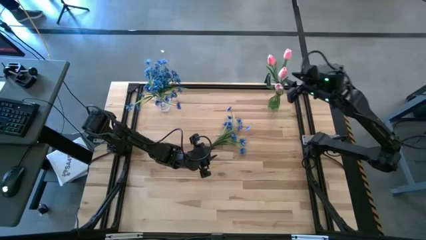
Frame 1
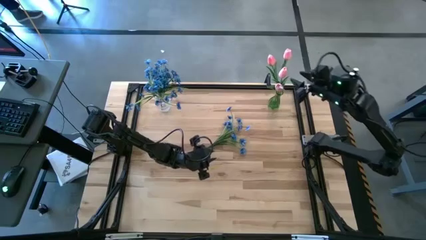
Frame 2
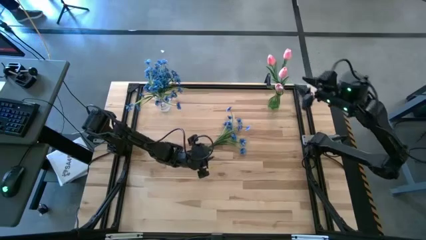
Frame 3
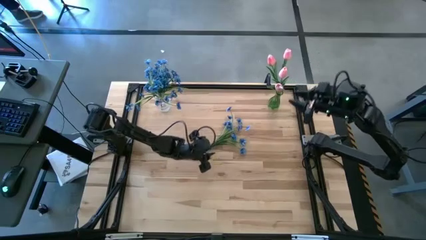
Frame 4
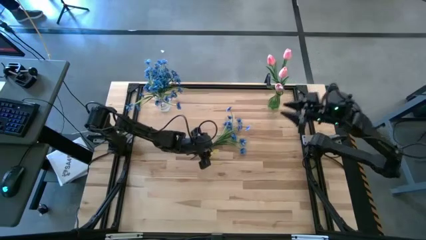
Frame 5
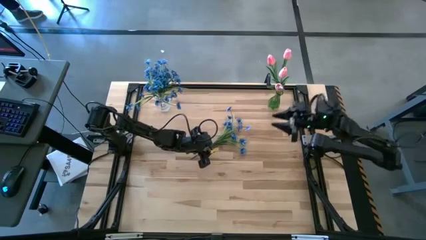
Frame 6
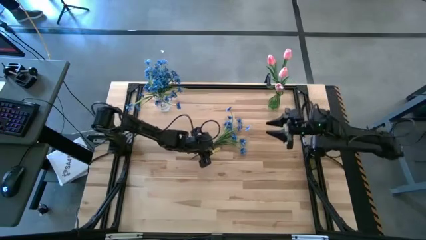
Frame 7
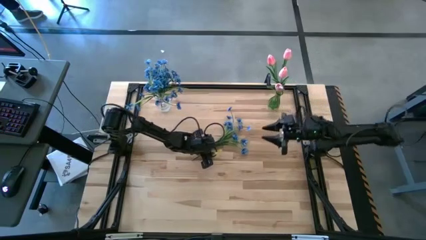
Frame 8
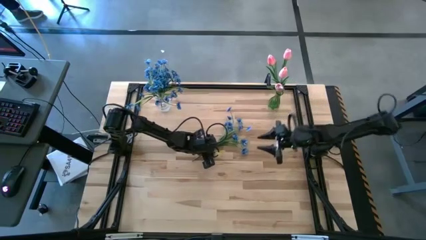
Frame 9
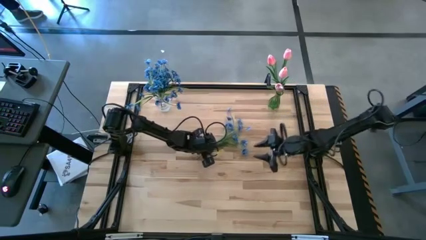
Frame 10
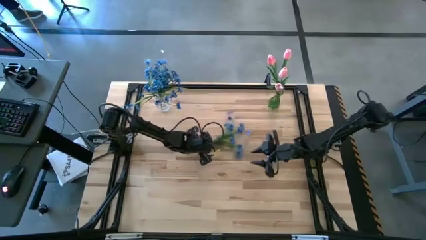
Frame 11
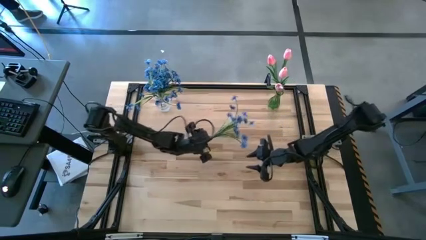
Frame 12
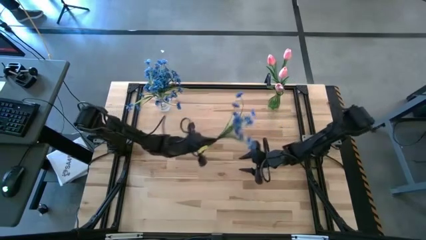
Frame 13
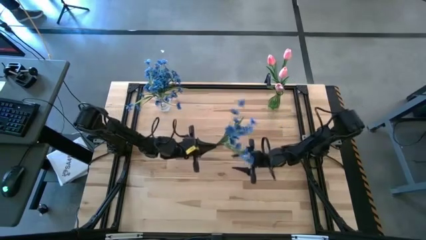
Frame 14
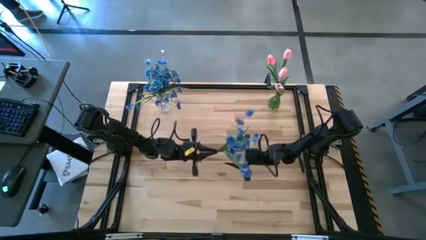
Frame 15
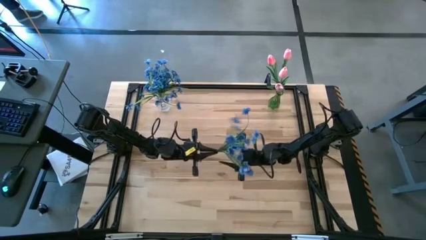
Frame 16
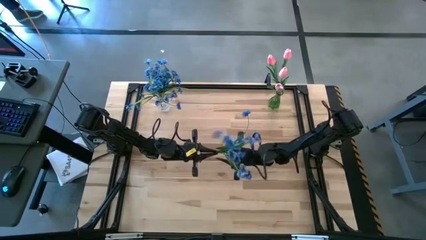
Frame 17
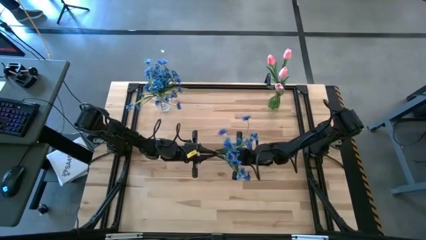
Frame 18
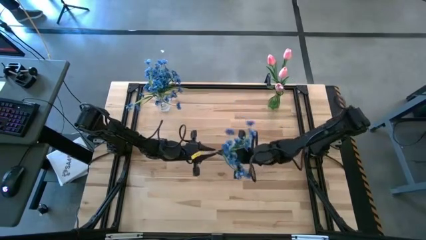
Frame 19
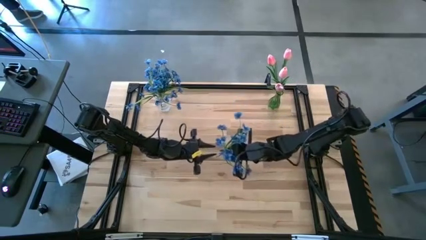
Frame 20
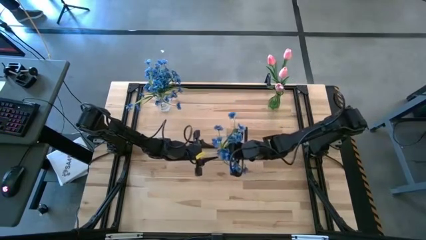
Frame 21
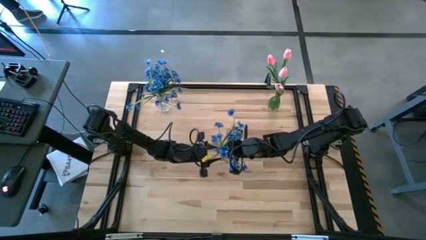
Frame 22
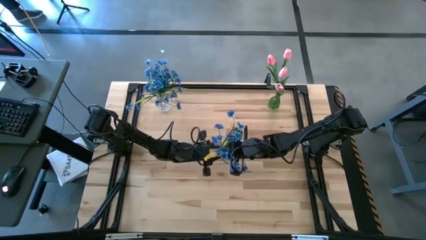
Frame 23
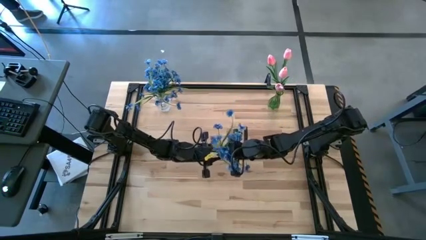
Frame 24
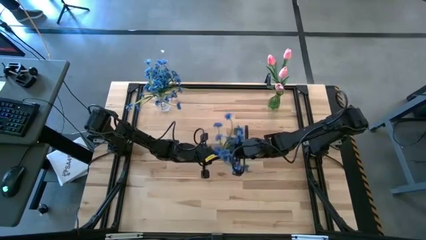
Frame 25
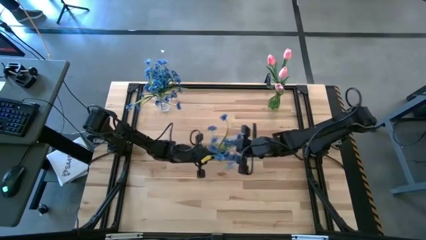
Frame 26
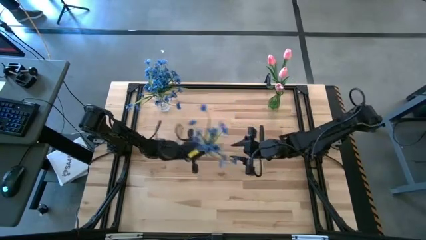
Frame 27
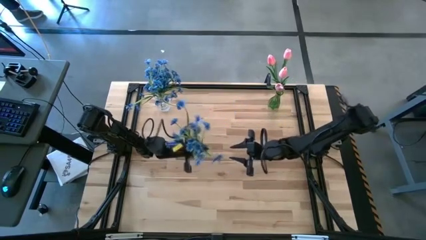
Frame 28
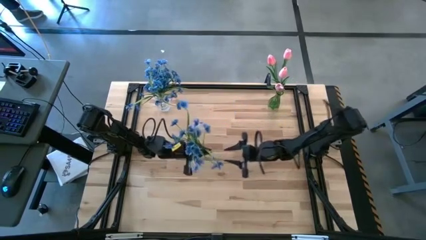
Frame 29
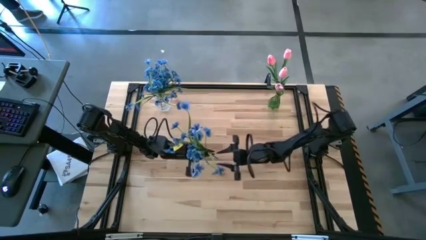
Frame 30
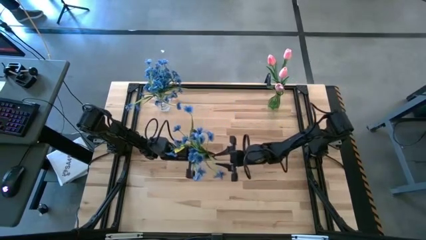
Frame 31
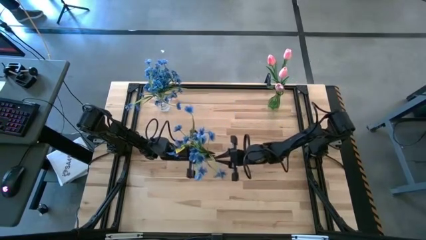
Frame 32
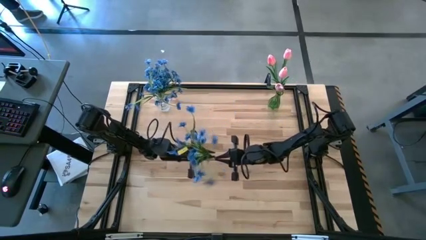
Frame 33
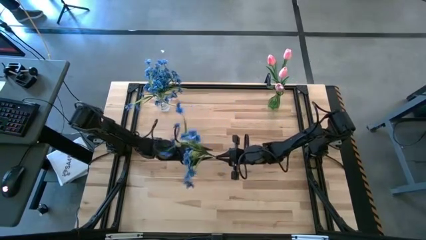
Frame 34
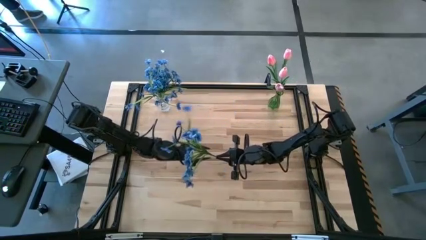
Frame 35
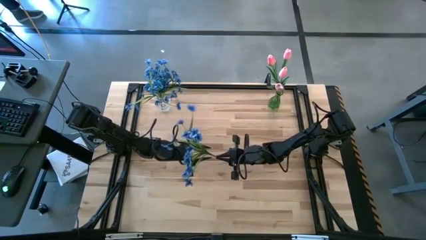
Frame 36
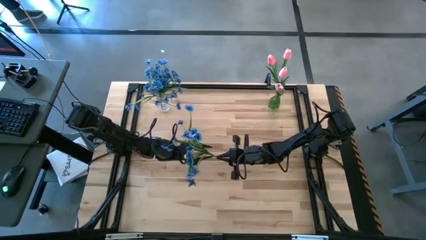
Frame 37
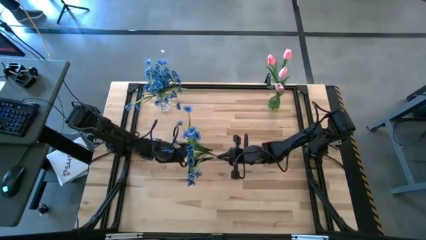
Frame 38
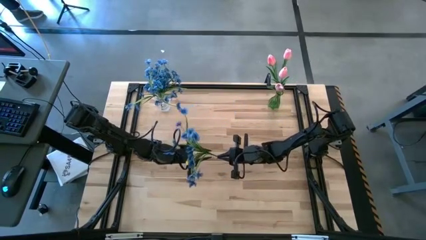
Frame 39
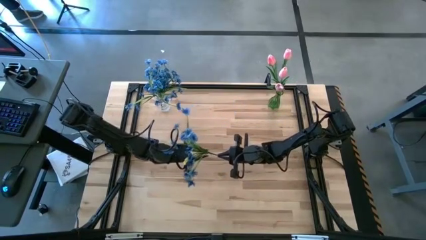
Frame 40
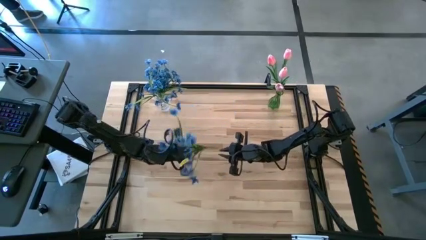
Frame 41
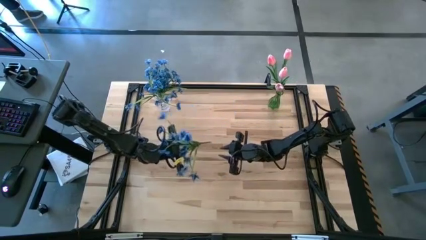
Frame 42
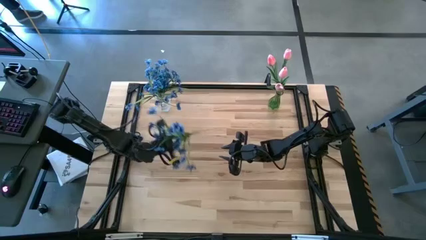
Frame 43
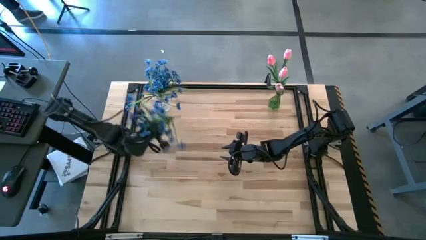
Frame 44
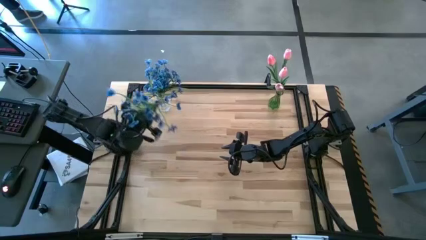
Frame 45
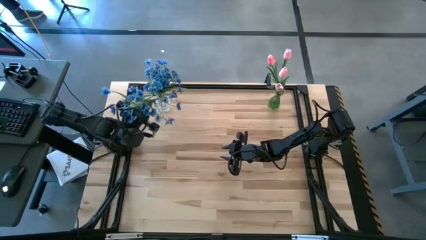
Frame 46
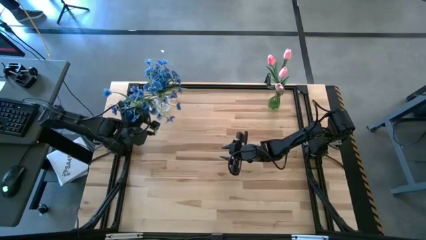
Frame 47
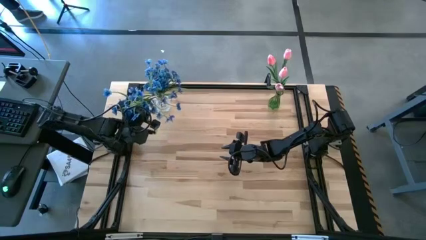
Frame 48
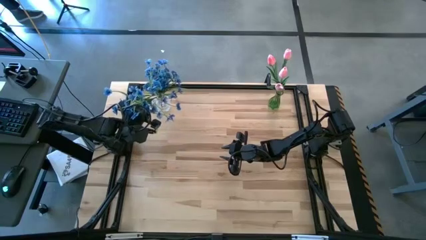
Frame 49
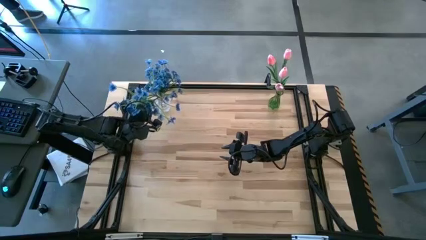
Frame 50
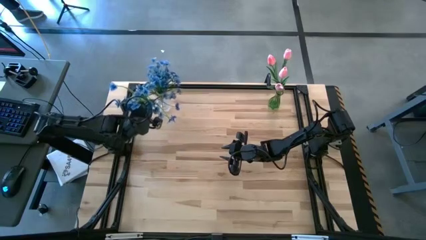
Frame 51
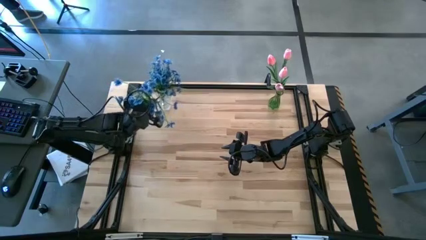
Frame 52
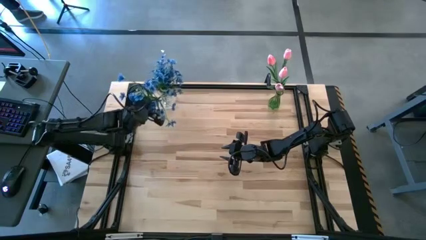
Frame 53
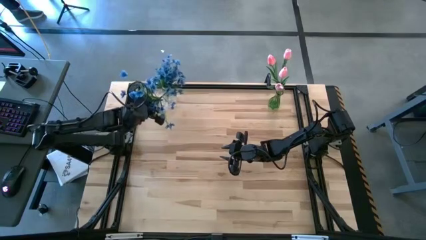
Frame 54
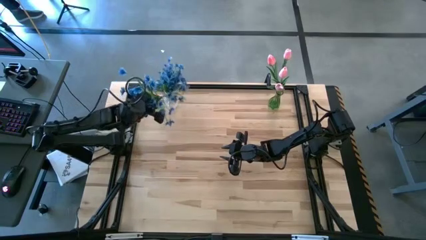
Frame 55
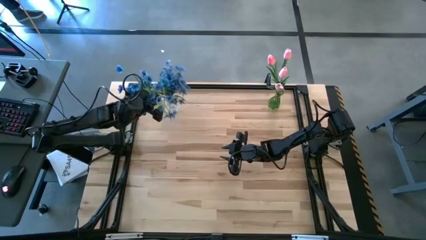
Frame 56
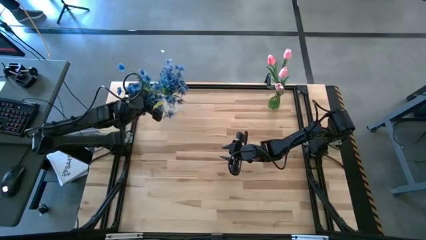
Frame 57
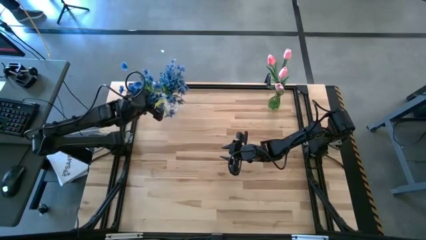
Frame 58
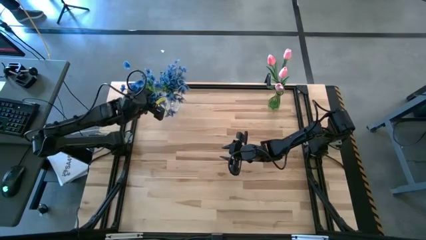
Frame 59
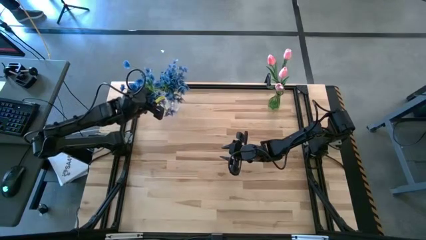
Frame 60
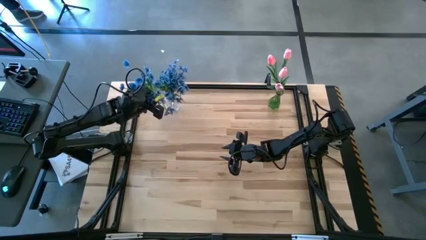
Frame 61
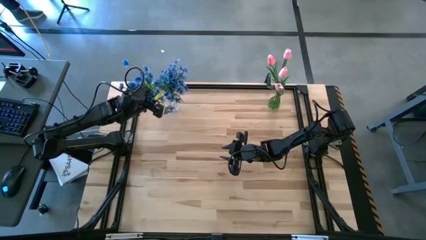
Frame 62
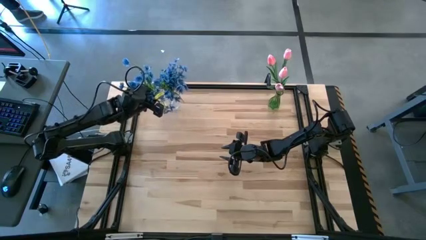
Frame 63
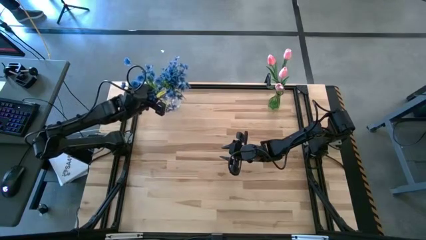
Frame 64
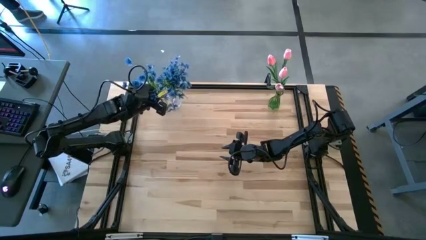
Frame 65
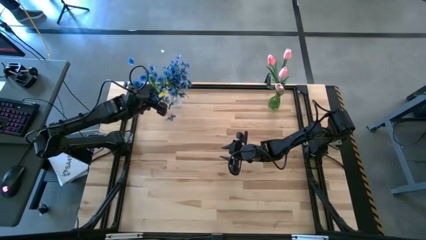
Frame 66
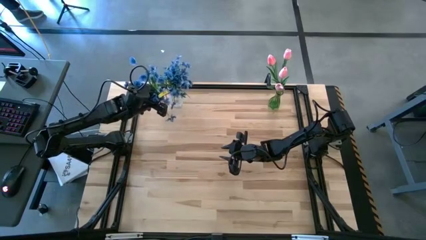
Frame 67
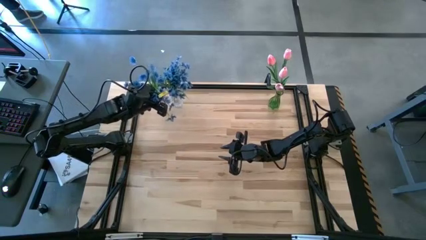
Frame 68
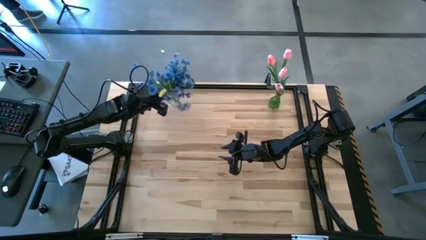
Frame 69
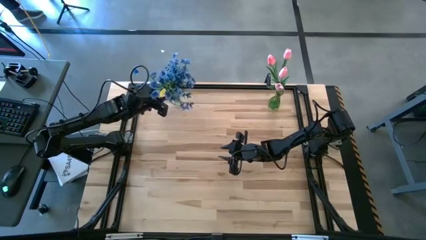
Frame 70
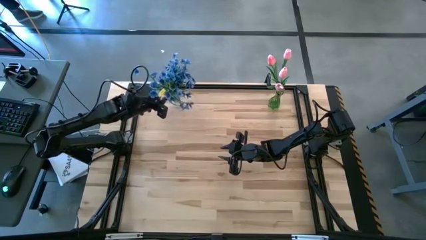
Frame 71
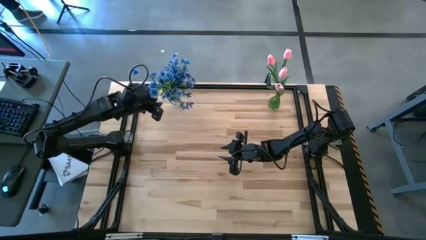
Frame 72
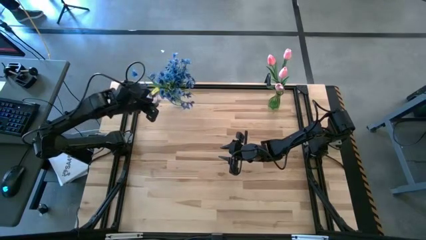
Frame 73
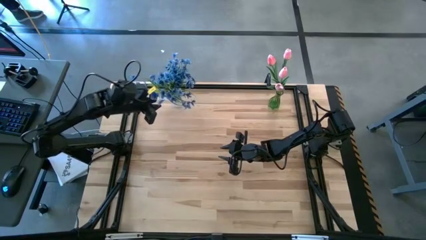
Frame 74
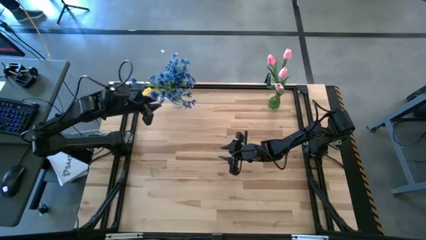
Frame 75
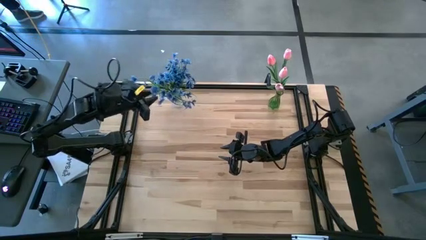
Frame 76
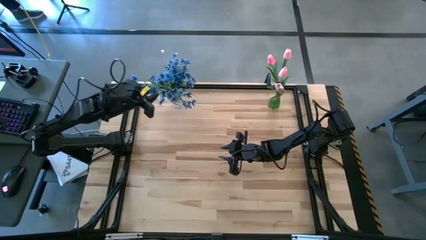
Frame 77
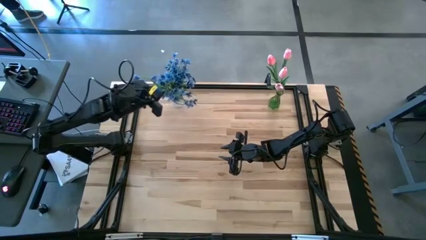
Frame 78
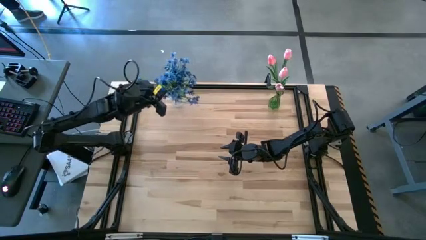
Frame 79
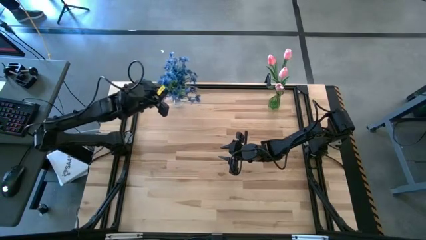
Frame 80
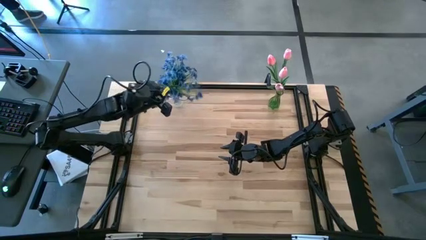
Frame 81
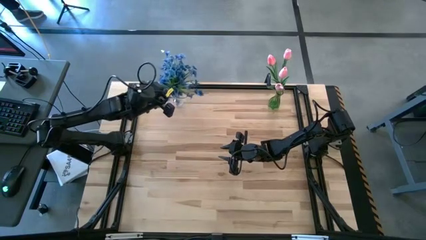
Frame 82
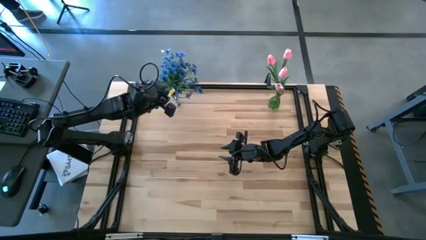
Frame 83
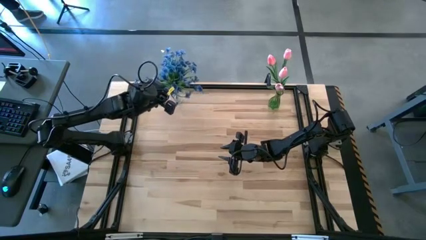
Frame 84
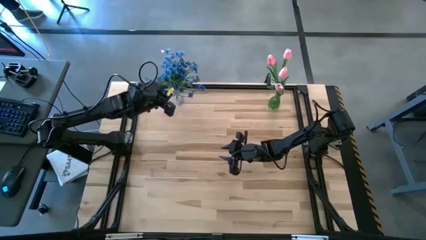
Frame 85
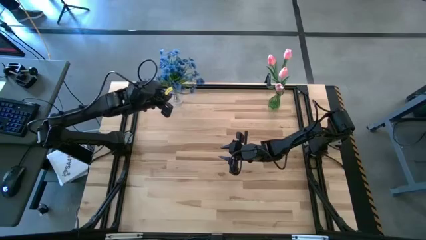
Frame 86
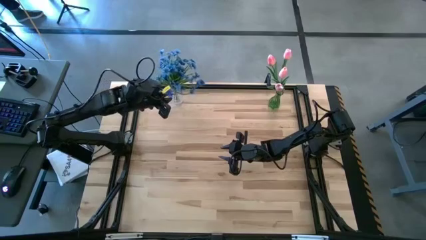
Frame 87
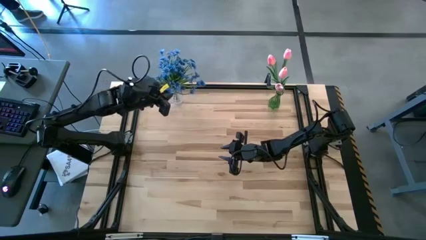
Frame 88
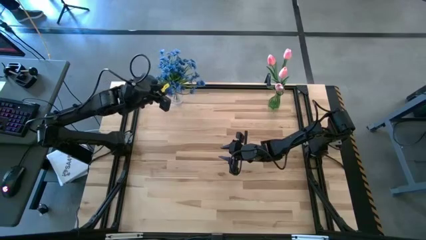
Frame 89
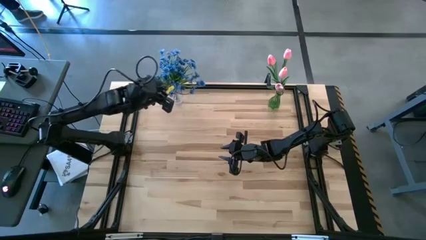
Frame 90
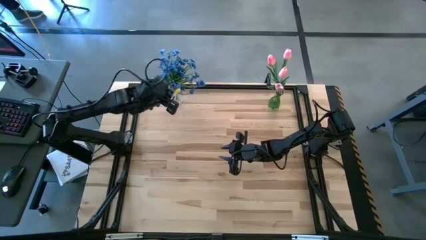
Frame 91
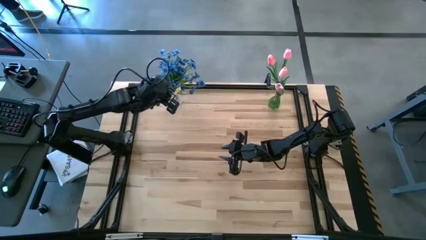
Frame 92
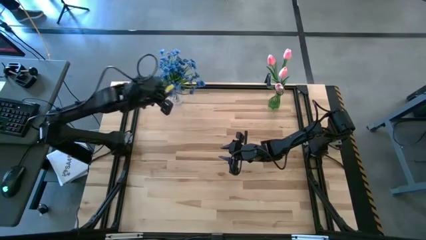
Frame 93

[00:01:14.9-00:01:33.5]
Task: Sort flowers into vase by color
Put the blue flowers into the transparent vase
